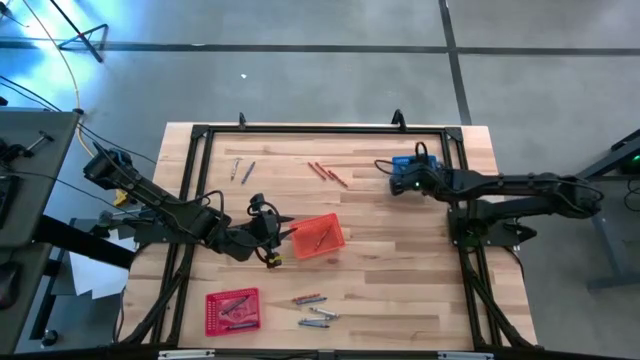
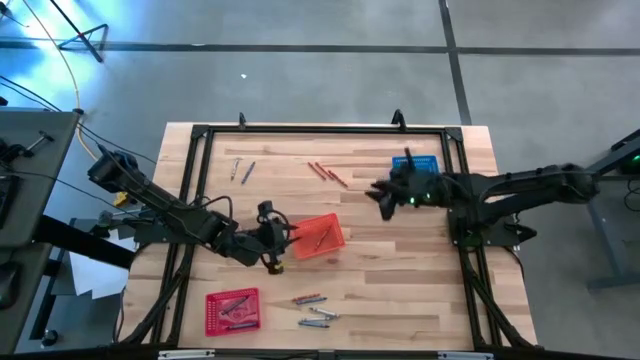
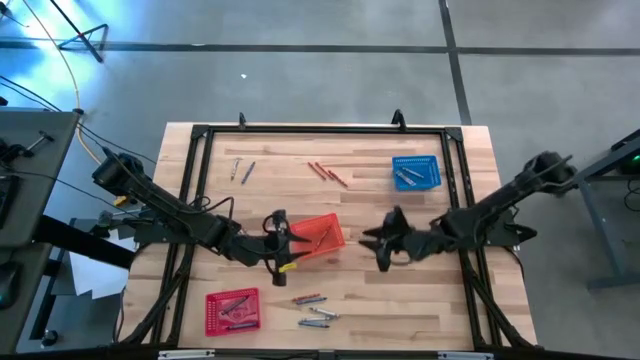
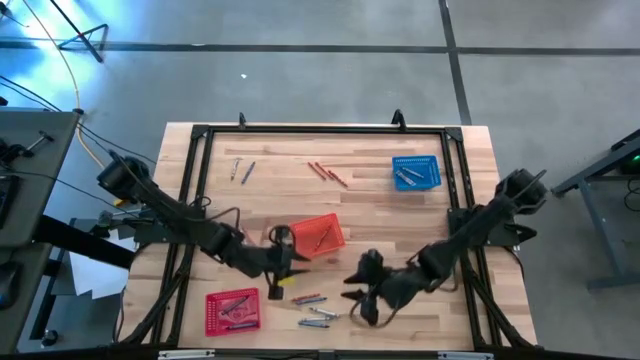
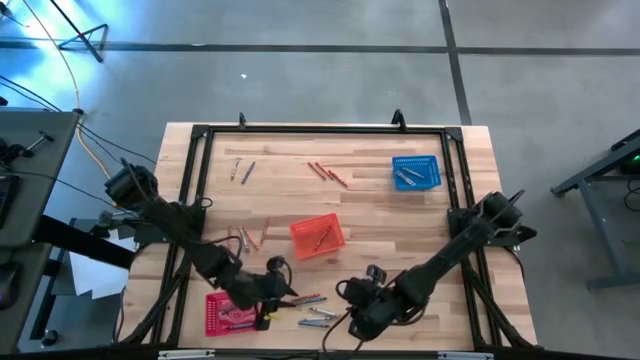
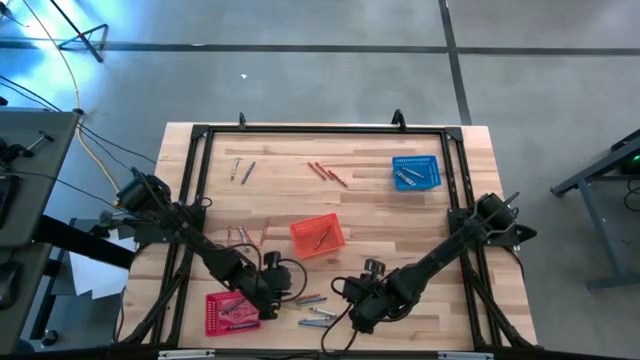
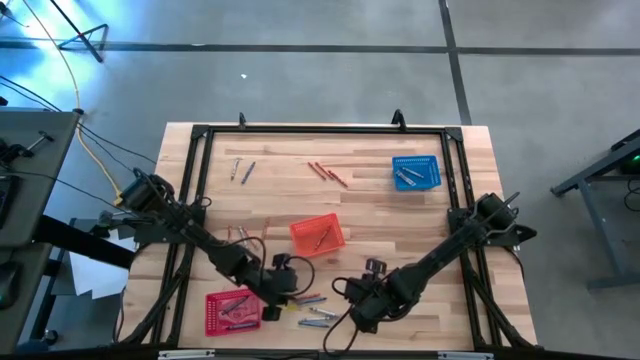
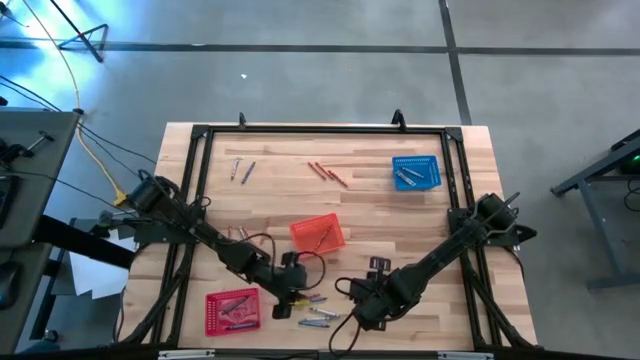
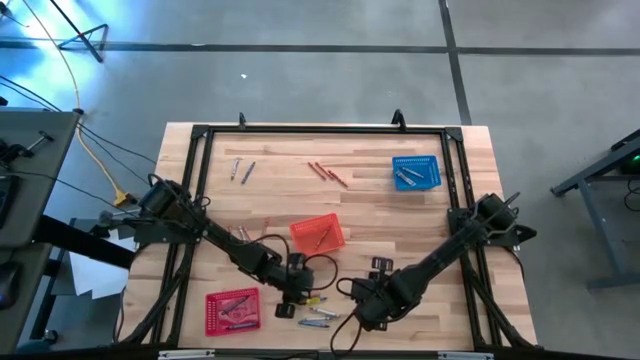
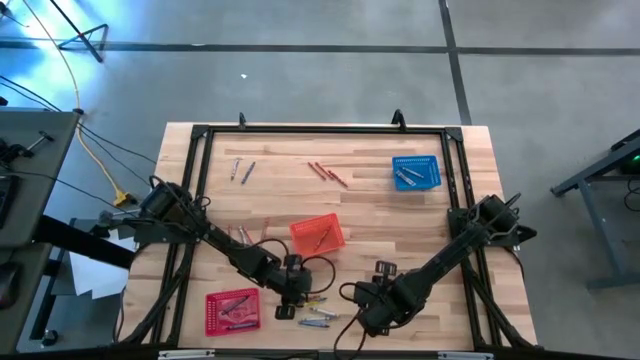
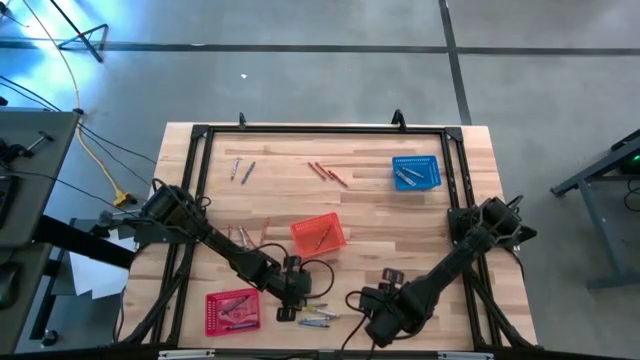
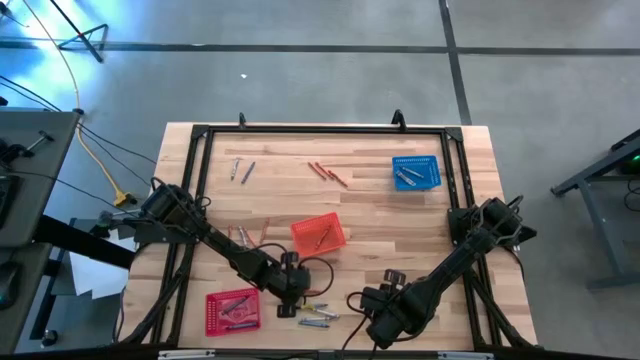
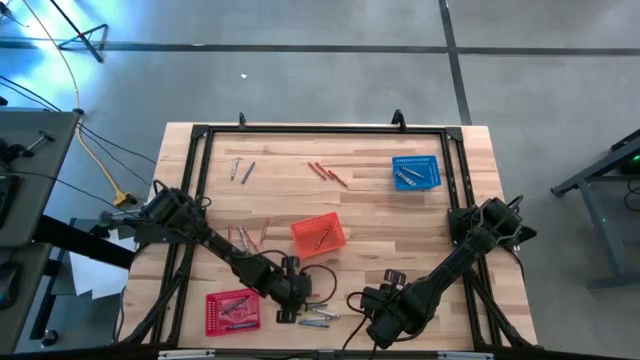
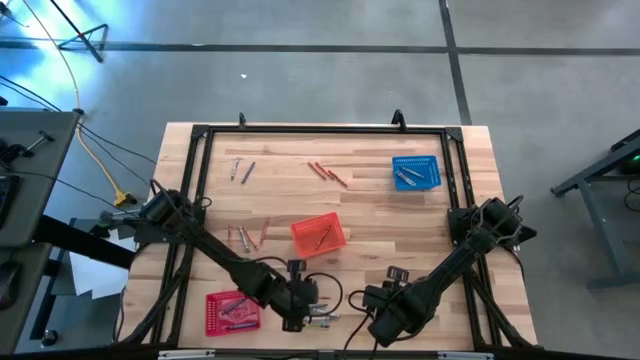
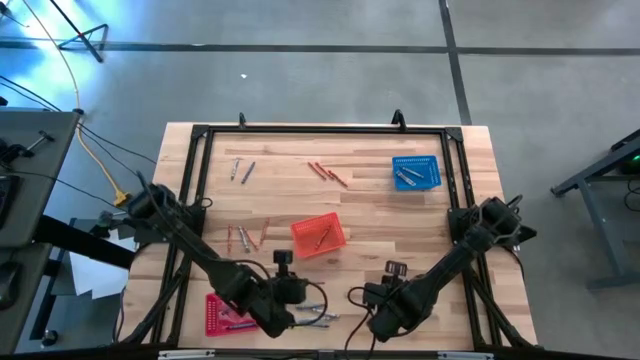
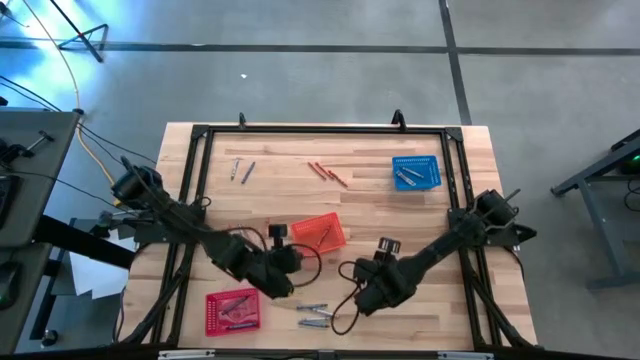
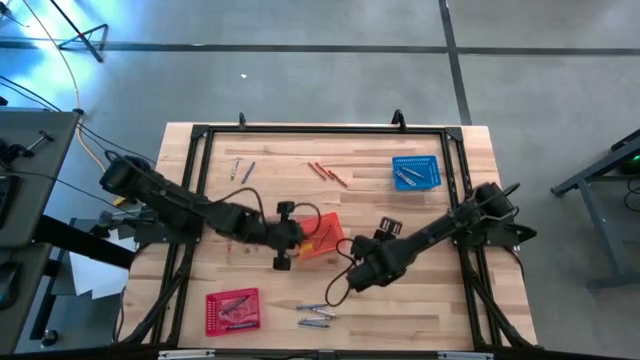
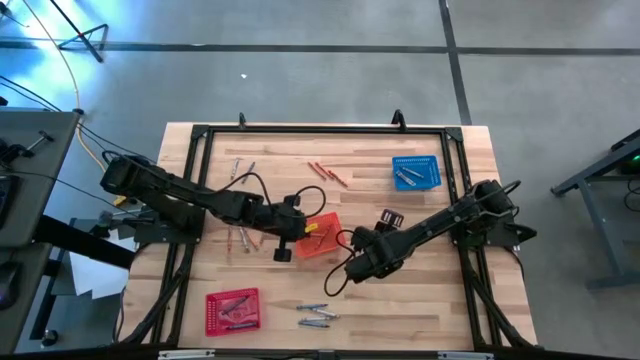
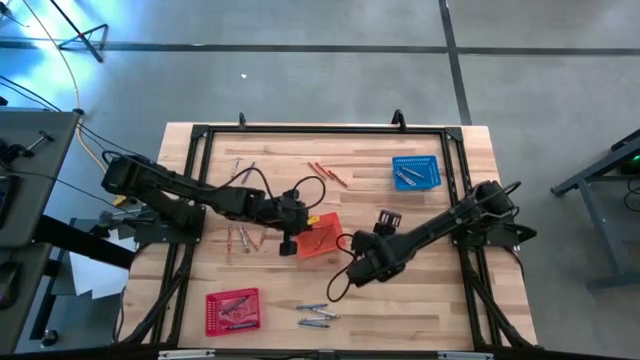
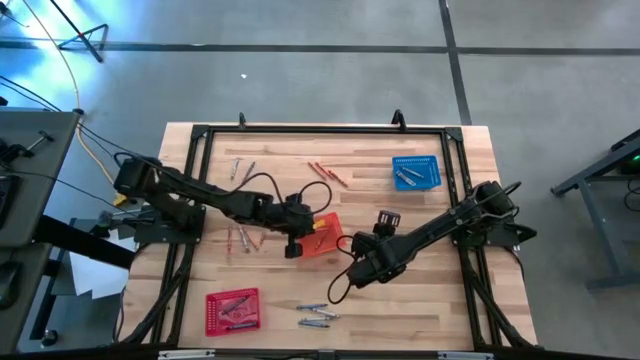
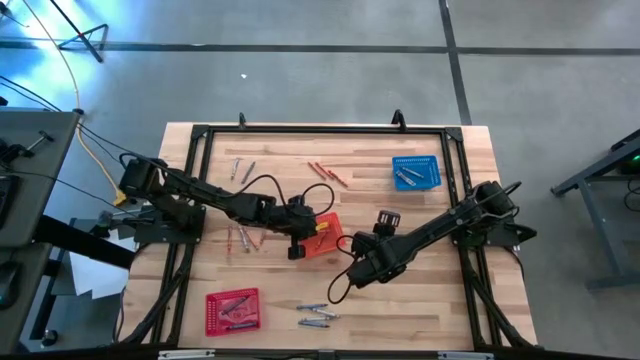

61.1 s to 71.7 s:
Task: Sort crayons
Put the orange crayon into the orange bin

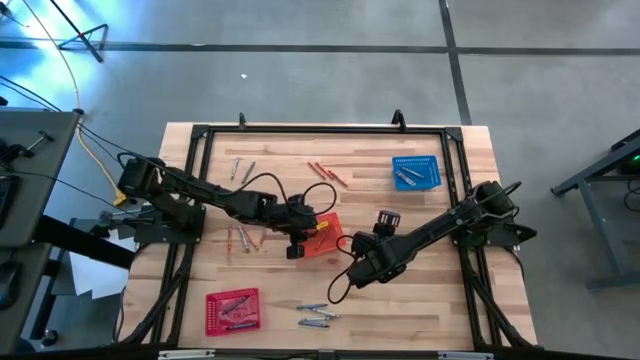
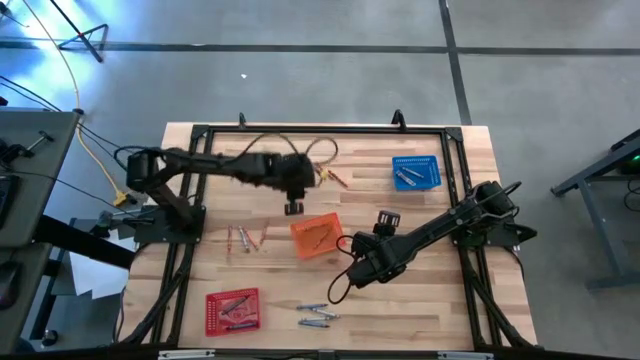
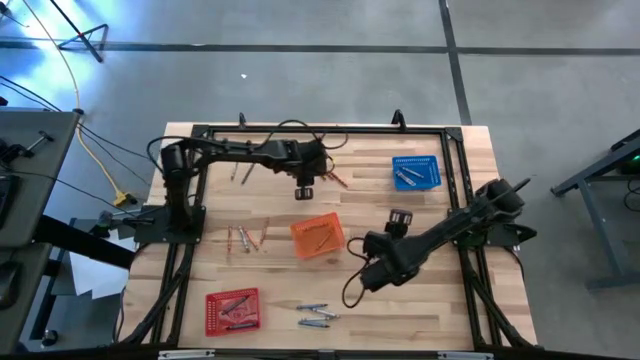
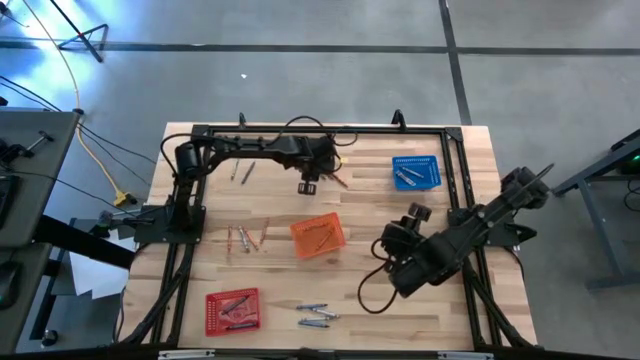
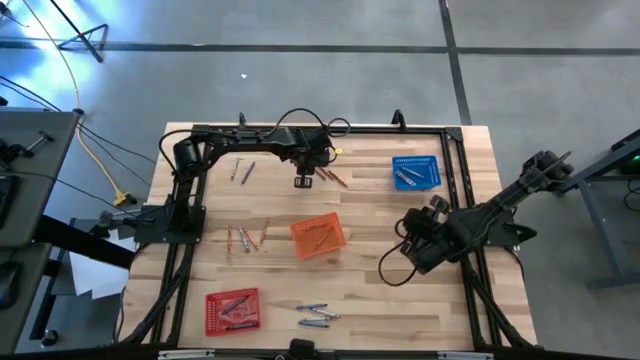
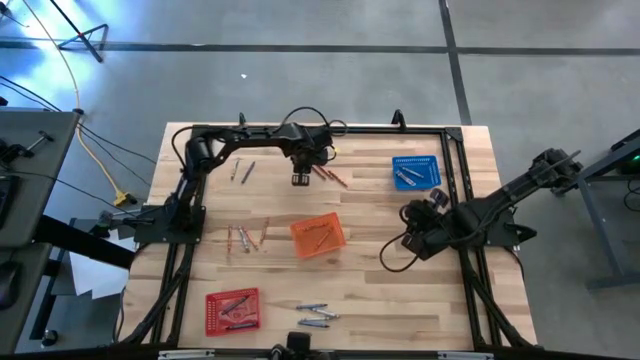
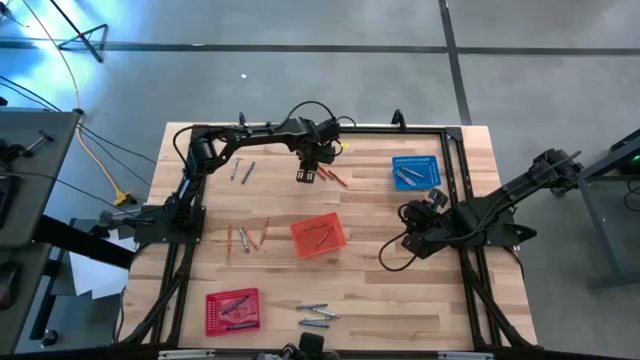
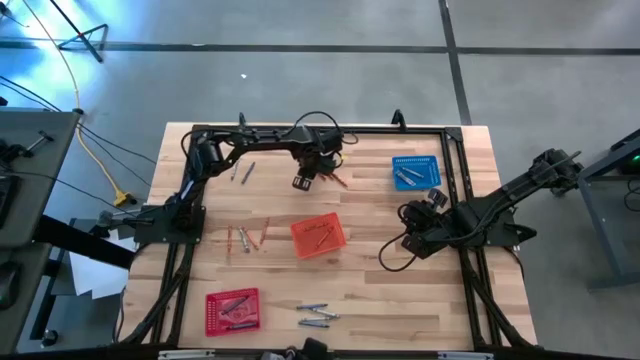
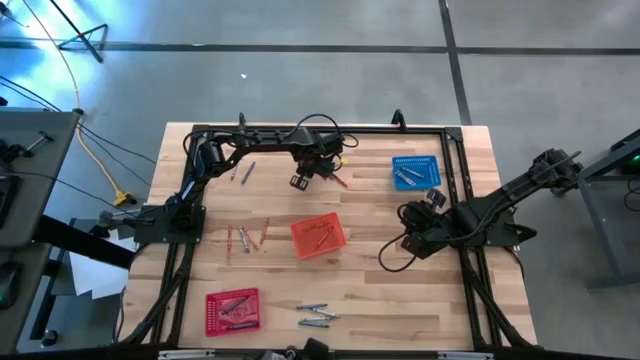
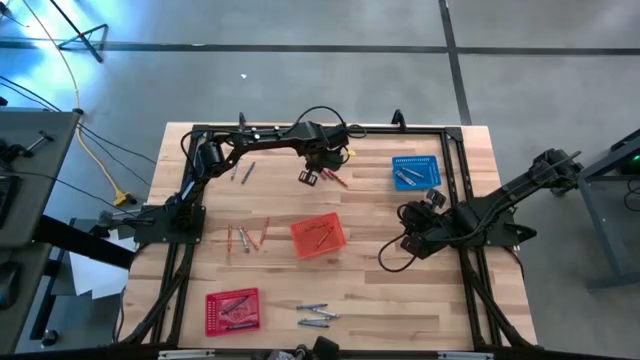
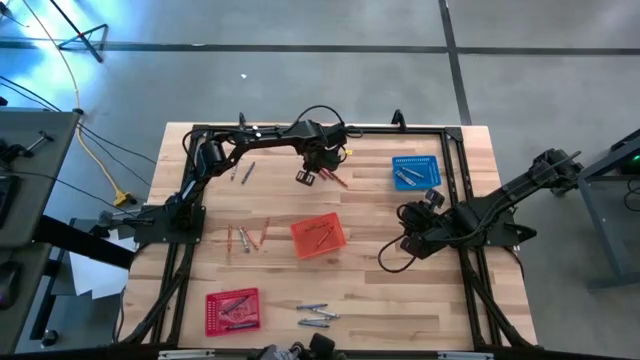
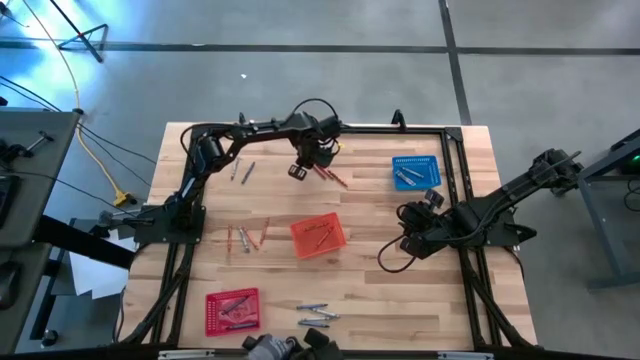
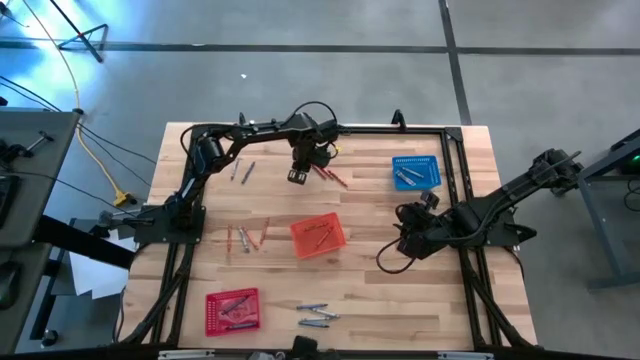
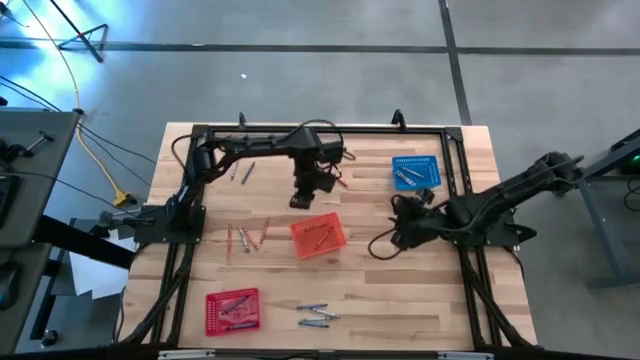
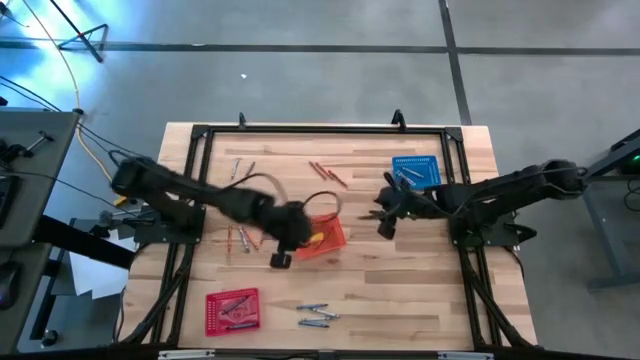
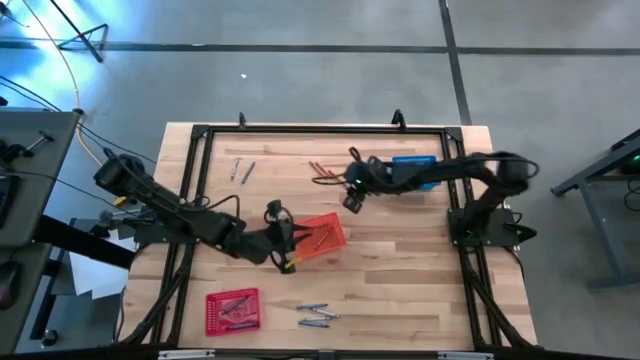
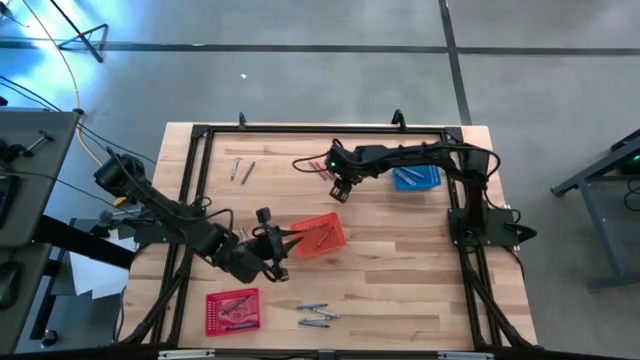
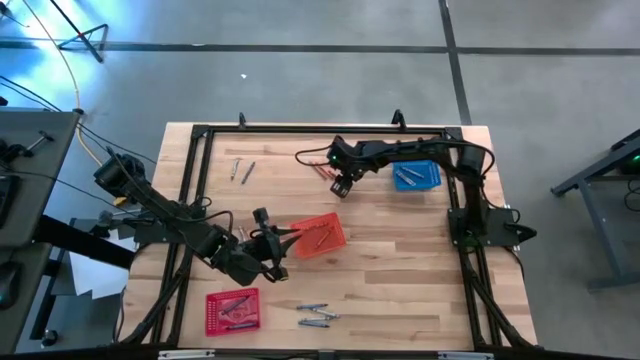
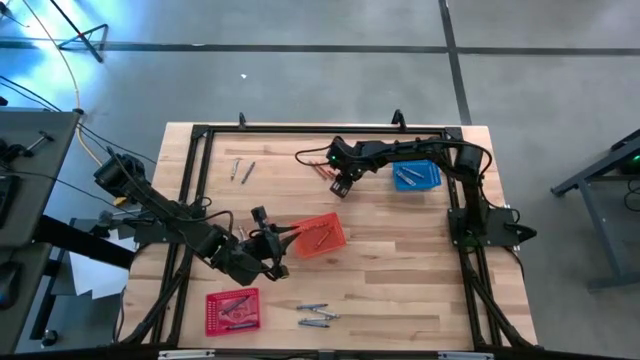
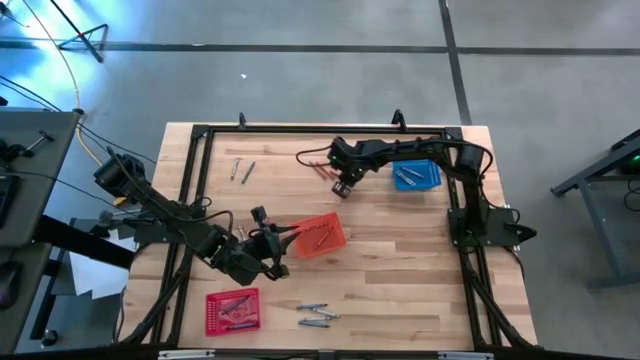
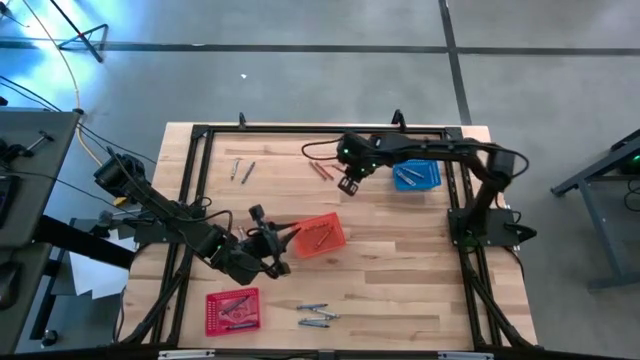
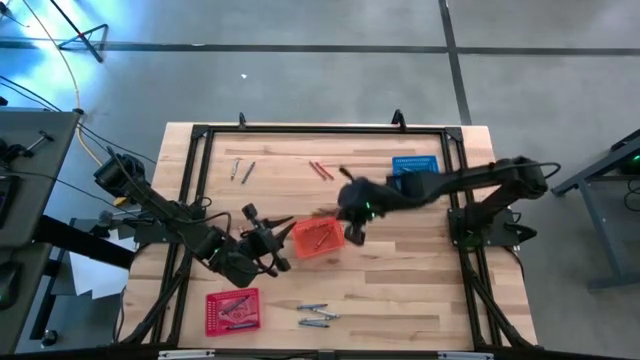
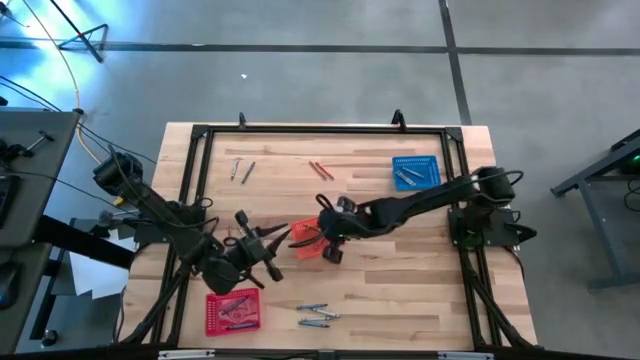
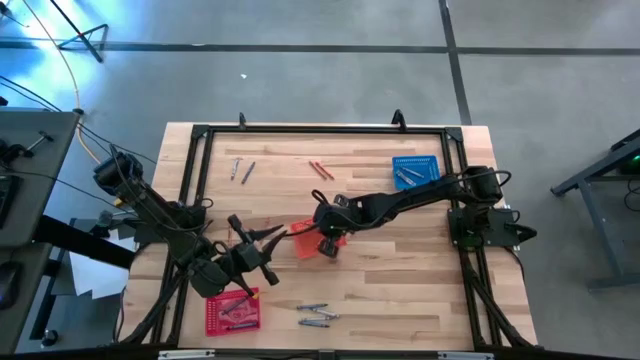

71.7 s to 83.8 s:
Put the orange crayon into the orange bin
